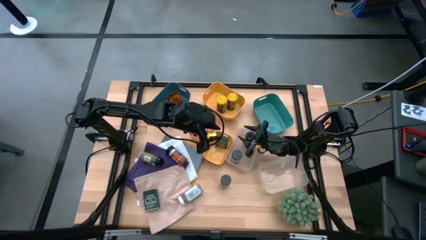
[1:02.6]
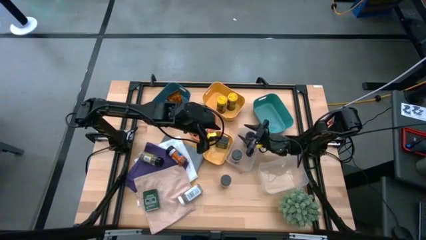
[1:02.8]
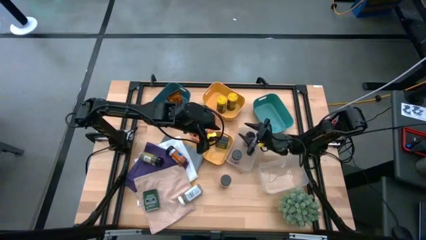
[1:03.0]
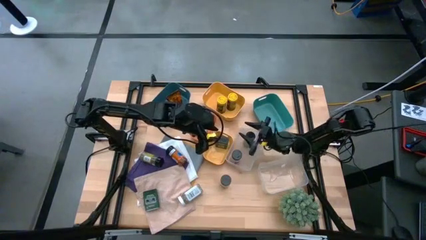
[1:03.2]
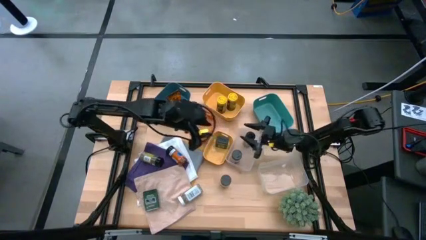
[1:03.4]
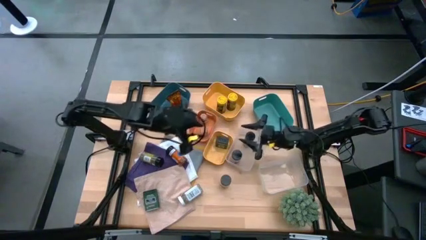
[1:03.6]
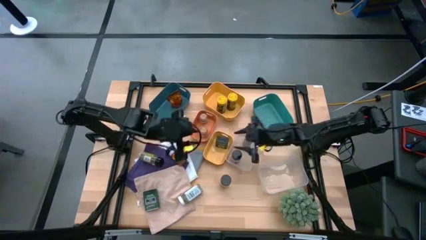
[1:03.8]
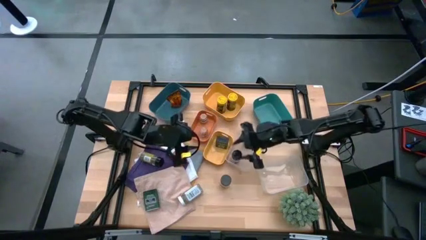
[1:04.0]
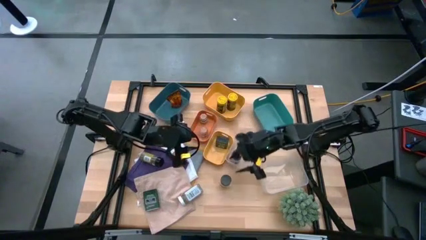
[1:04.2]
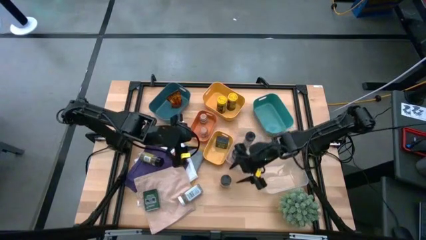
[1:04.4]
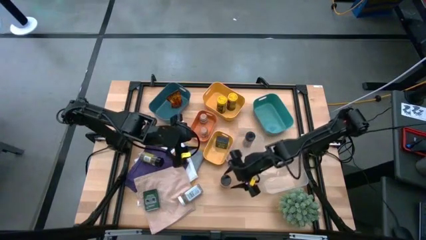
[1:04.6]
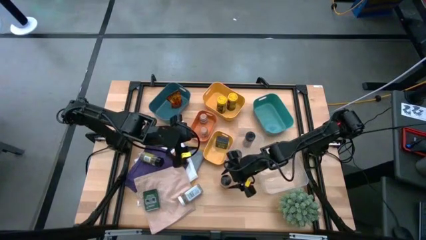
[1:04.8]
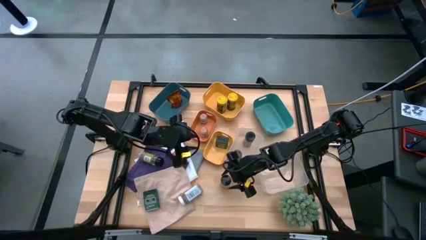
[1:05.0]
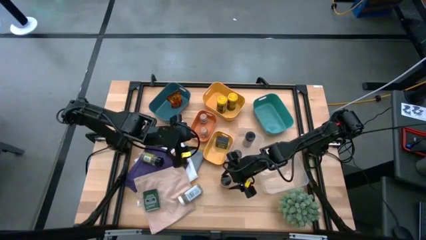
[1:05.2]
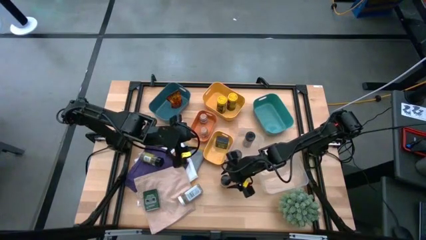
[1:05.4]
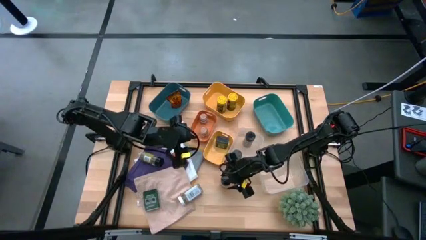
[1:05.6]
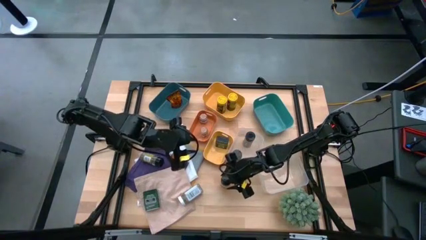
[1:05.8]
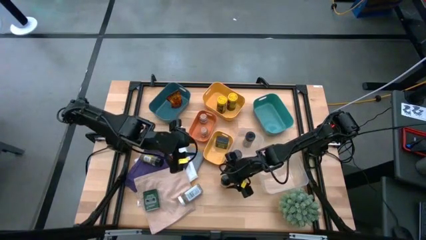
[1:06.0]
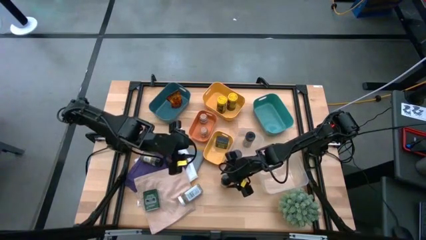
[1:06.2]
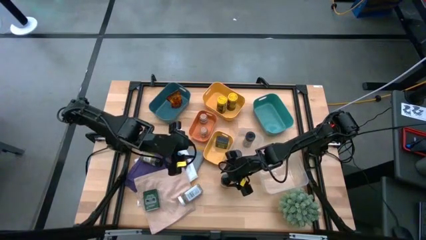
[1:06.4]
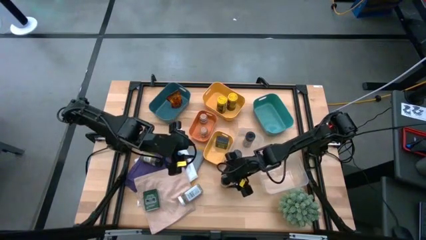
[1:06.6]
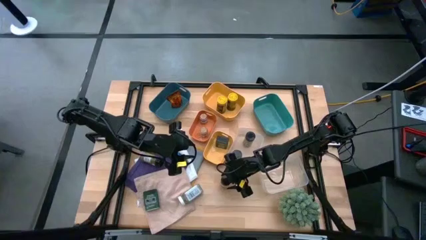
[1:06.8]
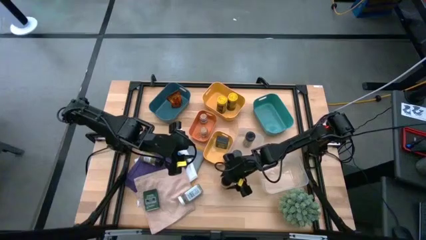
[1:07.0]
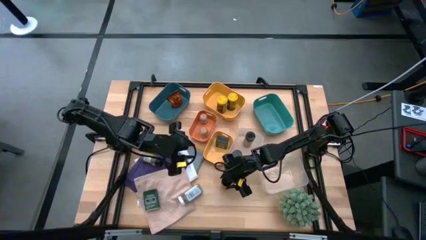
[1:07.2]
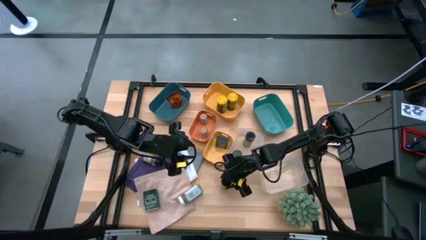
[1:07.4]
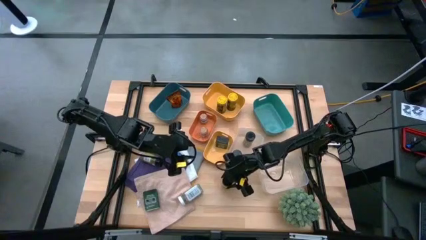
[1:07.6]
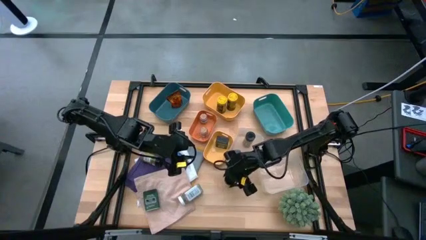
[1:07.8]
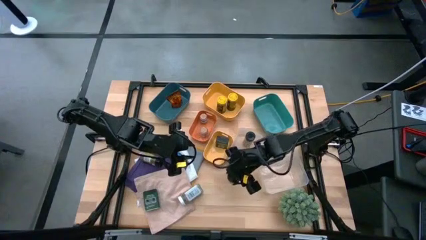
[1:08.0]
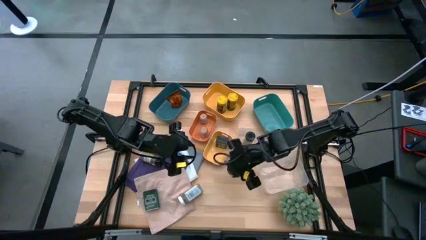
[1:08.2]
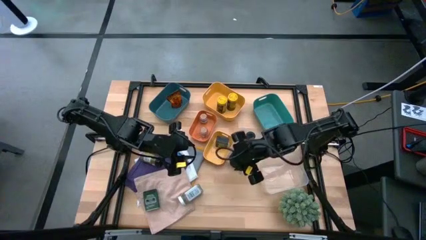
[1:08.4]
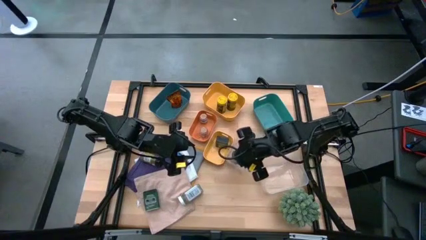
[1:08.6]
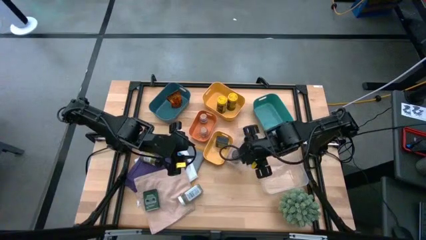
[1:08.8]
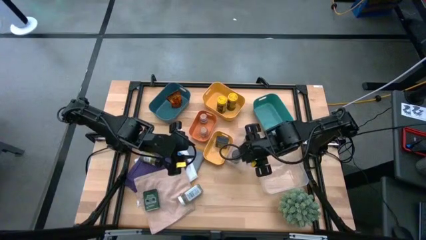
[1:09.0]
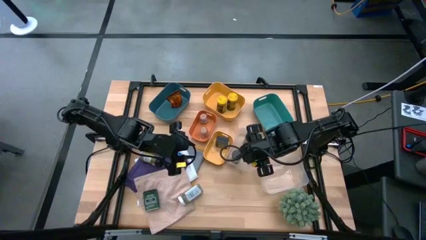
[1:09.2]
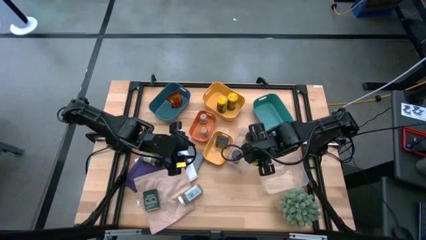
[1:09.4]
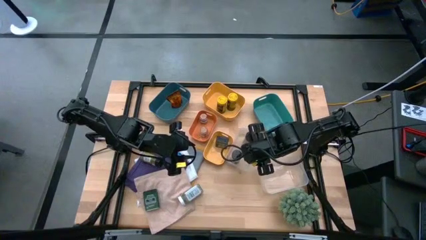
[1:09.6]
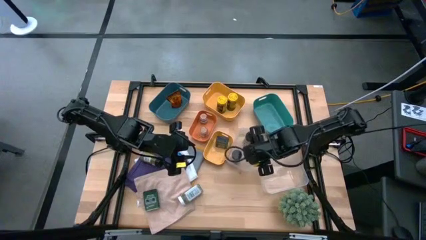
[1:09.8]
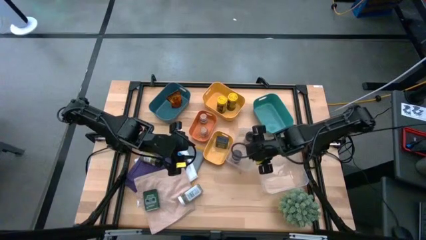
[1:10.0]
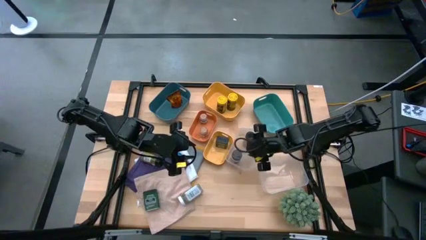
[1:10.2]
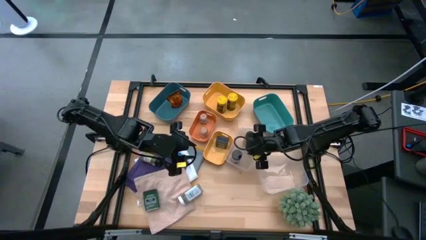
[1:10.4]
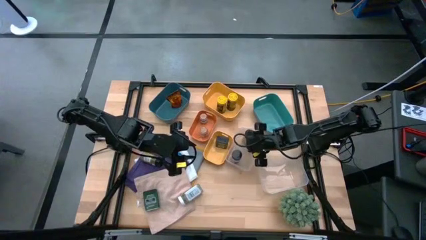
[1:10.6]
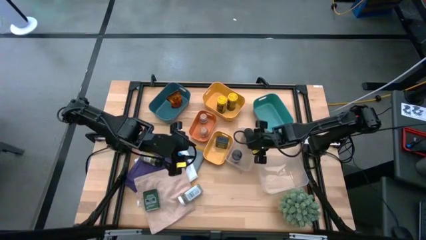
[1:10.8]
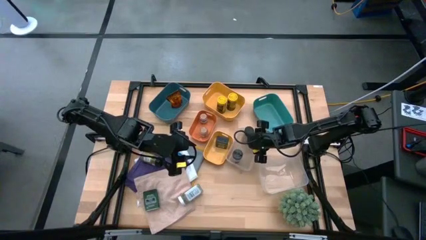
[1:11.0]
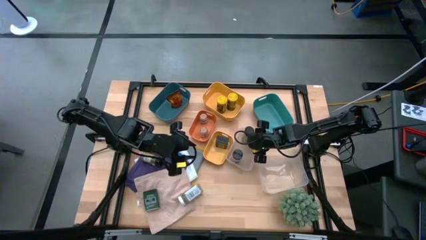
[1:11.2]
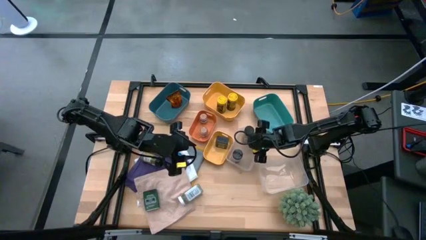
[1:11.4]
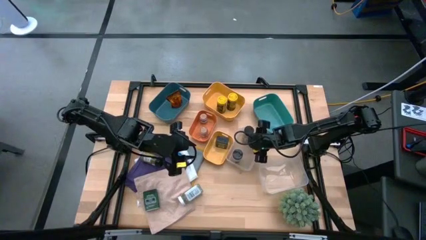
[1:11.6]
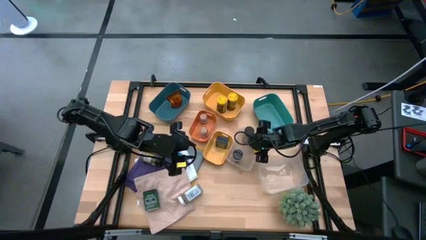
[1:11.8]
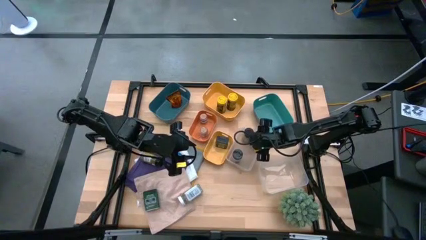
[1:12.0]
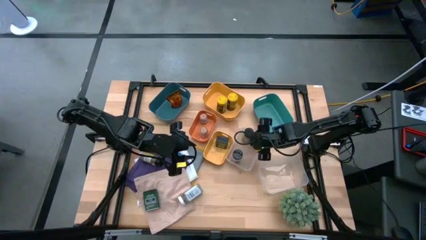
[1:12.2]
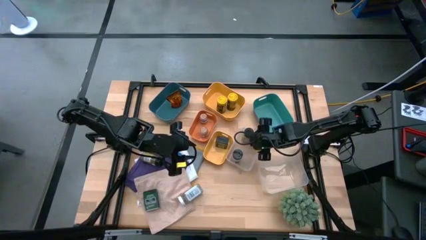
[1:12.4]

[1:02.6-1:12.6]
Task: Sort spices by type
Put the black seasoning bottle into the left white bin

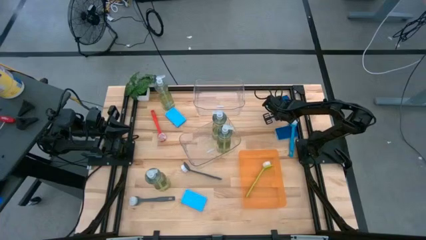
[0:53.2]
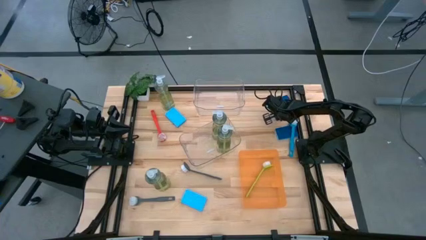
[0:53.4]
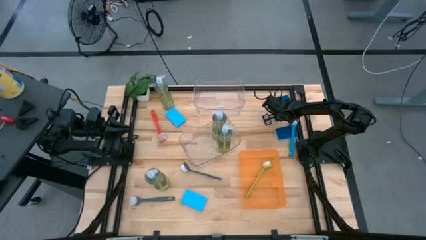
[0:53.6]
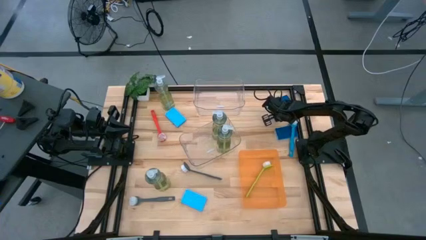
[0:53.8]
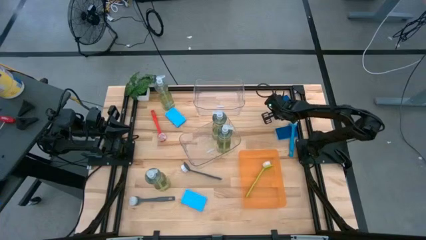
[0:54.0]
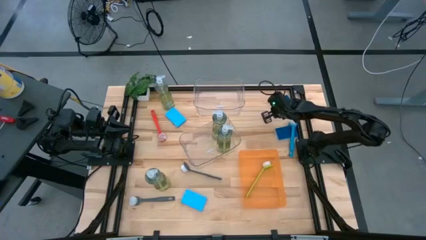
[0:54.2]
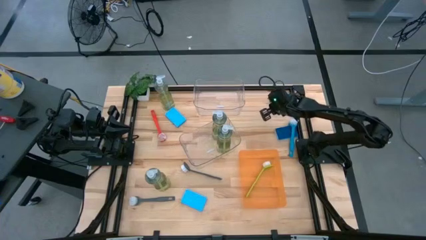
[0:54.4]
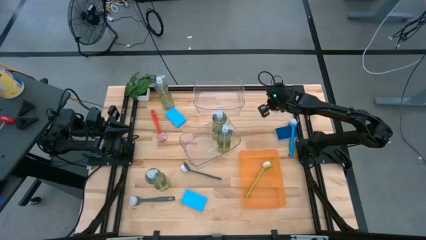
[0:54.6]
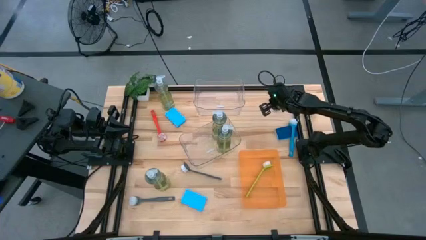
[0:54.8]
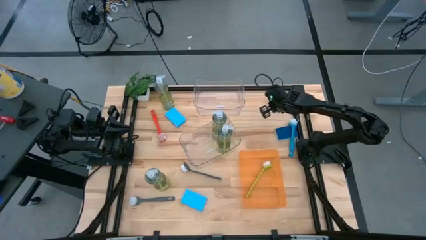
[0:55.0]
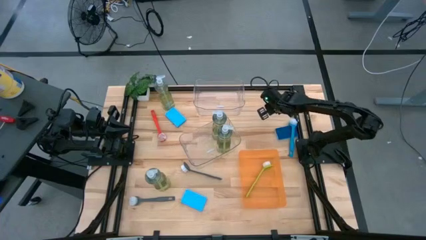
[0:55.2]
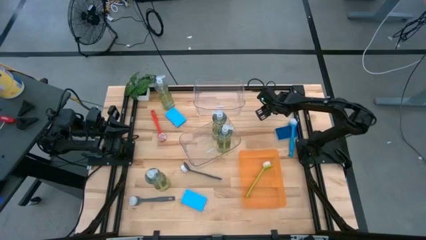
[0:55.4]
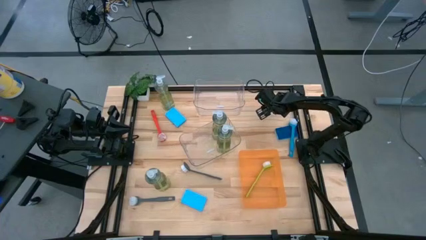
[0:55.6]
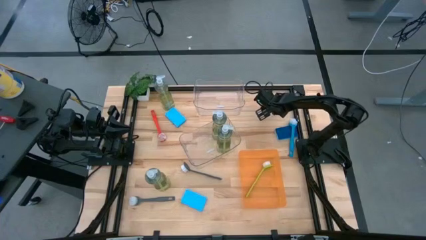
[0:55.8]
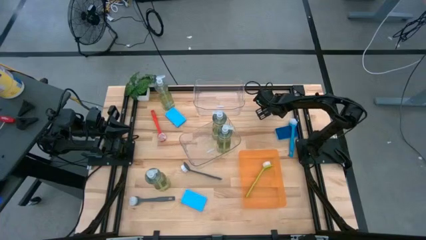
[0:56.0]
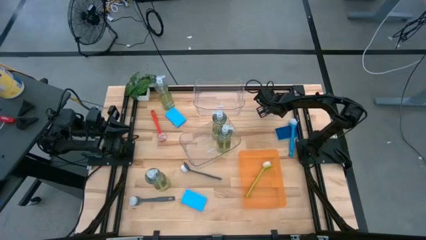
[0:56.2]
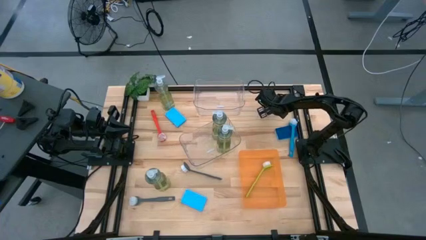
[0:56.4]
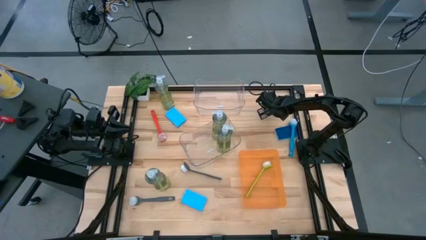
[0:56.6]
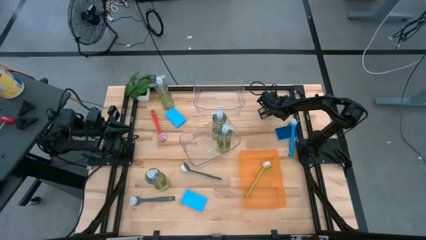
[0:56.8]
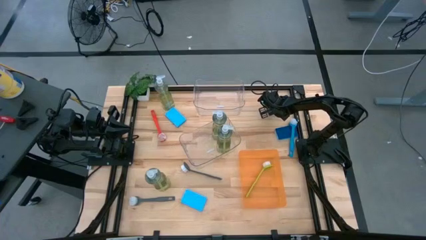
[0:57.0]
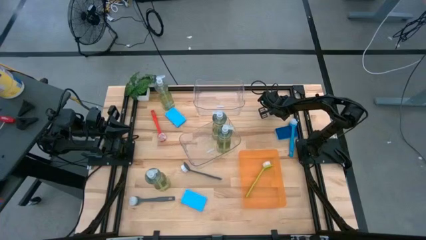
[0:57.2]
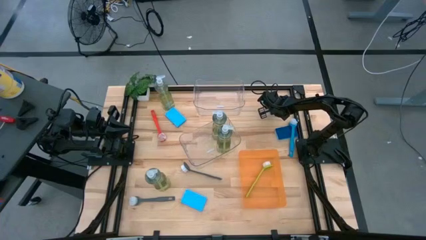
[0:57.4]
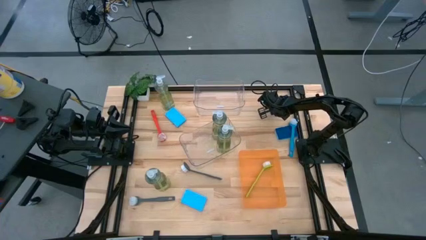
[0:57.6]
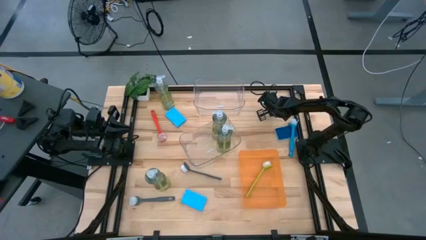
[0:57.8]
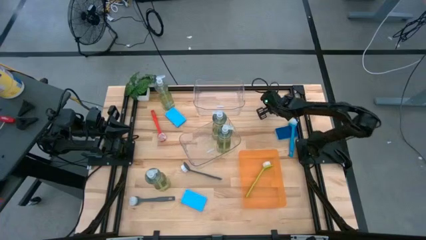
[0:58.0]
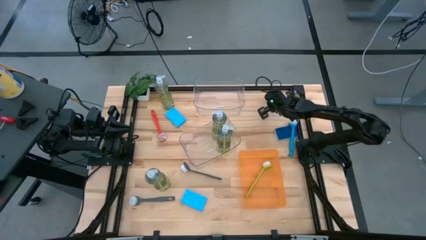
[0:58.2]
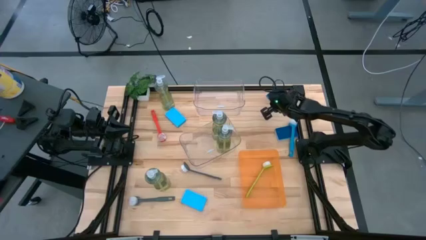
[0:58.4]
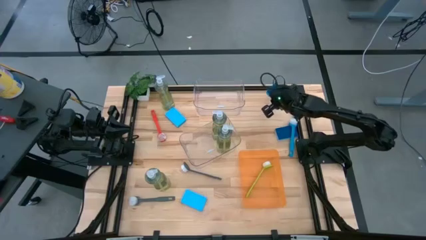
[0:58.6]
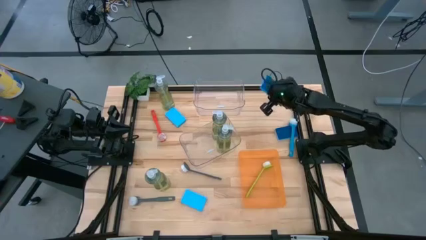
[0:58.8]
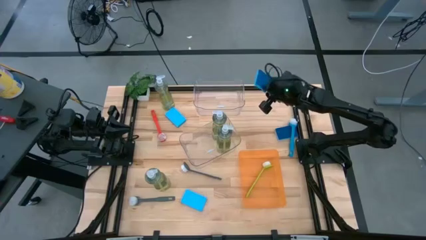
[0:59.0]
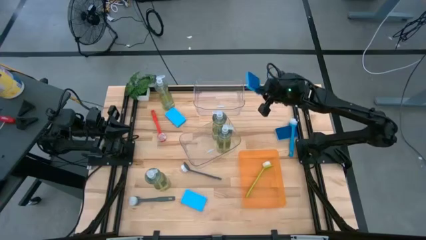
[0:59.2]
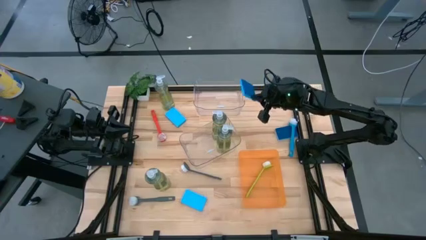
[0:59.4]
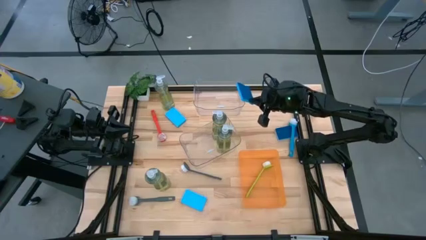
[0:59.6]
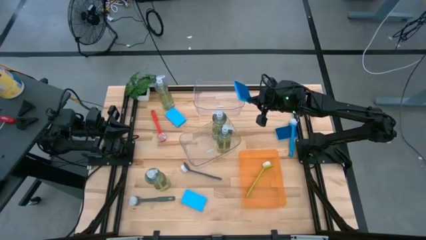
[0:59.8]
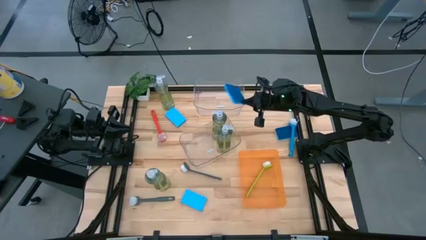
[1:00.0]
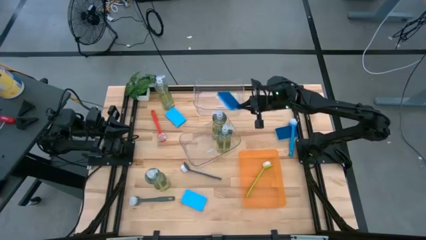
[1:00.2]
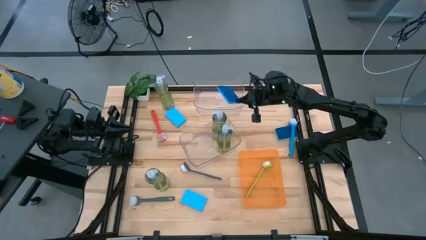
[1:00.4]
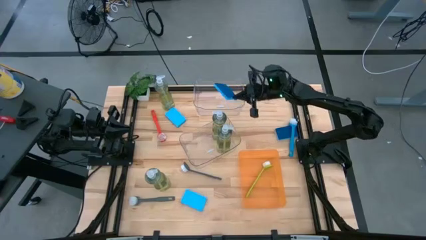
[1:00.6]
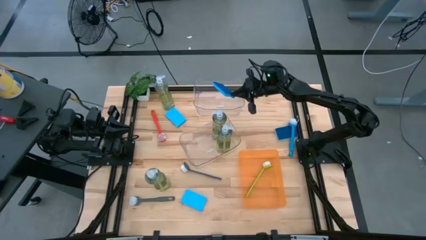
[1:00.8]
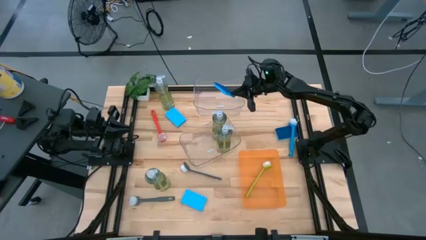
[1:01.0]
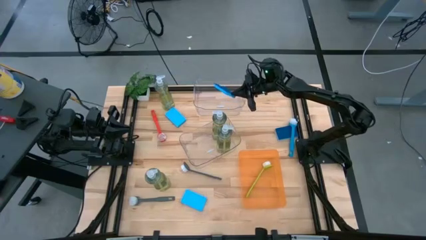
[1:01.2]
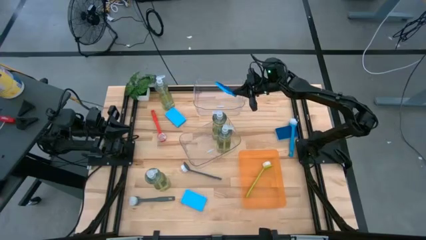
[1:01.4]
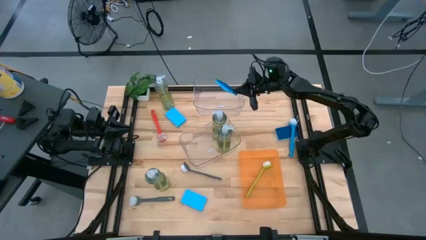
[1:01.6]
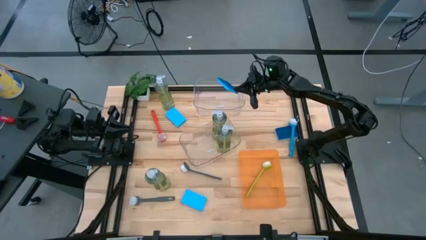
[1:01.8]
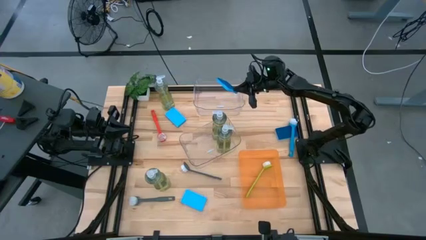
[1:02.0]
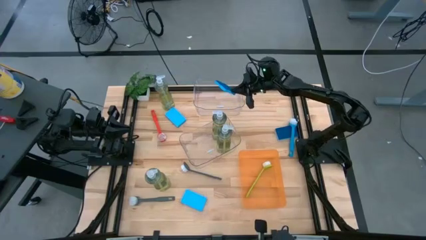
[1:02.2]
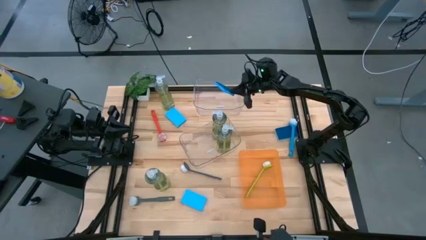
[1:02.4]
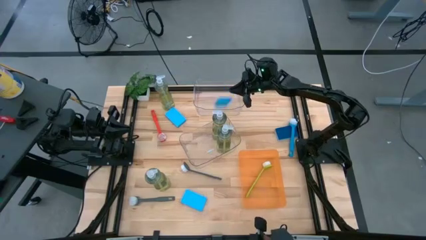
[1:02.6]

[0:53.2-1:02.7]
Task: Pick & Place Kitchen Sink Supplies
Put the blue sponge into the top transparent bin
